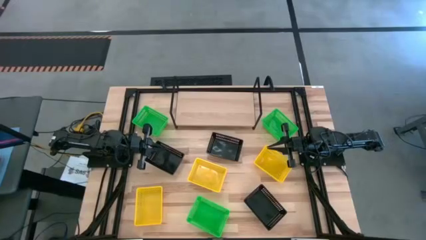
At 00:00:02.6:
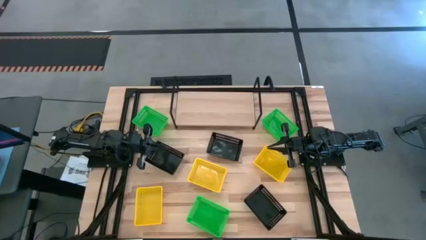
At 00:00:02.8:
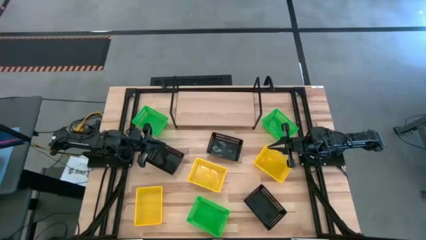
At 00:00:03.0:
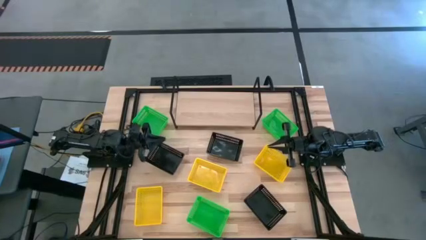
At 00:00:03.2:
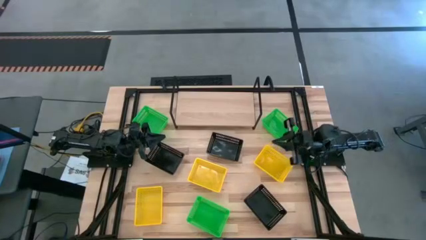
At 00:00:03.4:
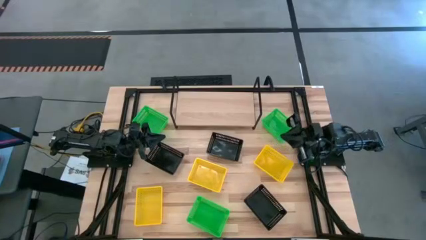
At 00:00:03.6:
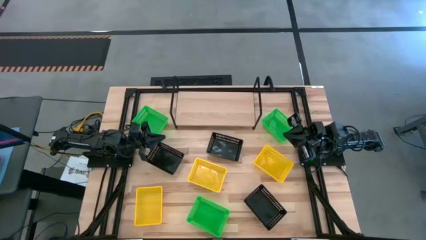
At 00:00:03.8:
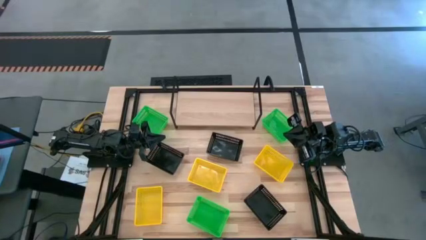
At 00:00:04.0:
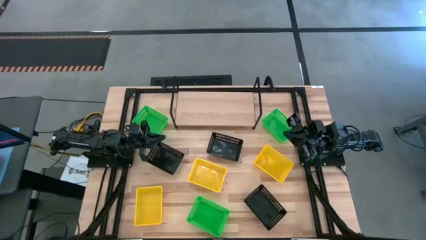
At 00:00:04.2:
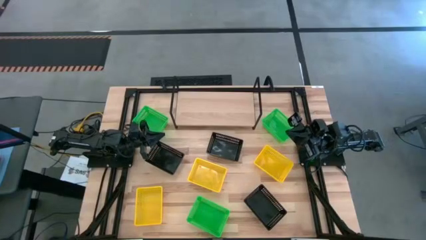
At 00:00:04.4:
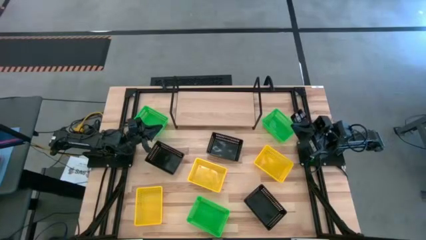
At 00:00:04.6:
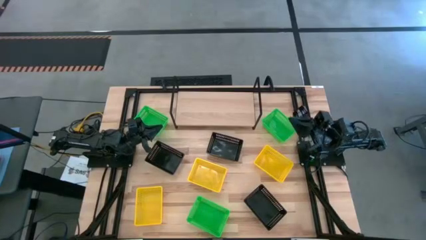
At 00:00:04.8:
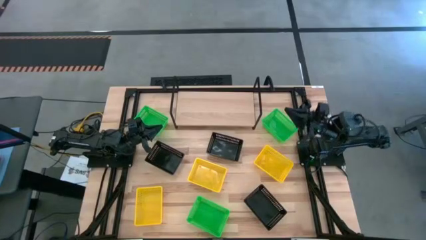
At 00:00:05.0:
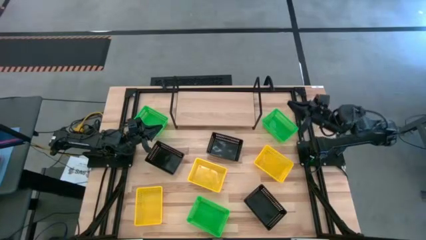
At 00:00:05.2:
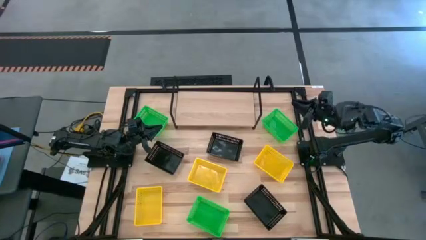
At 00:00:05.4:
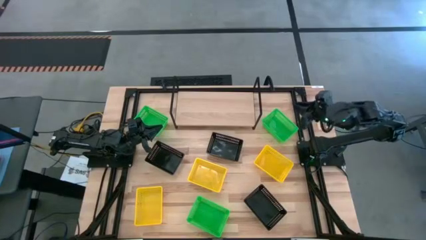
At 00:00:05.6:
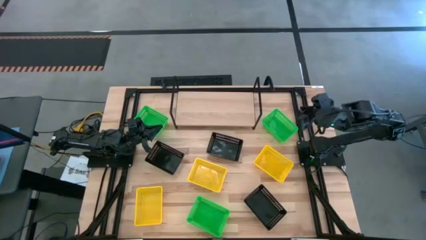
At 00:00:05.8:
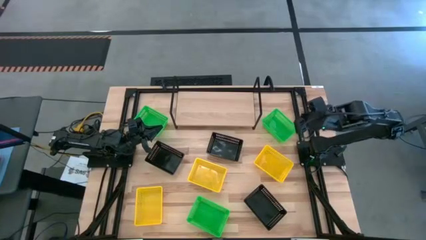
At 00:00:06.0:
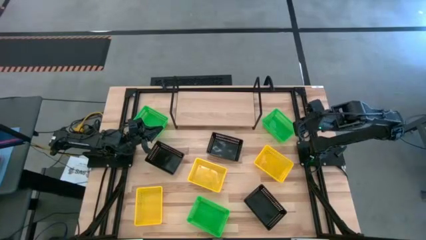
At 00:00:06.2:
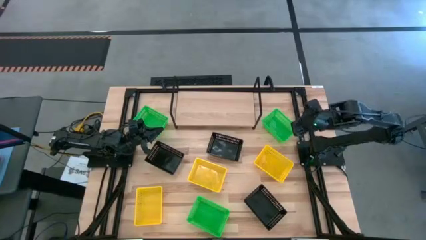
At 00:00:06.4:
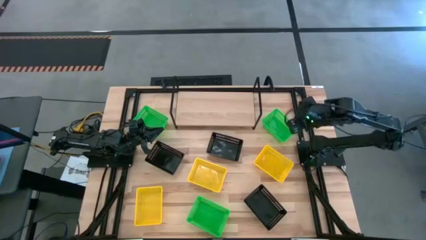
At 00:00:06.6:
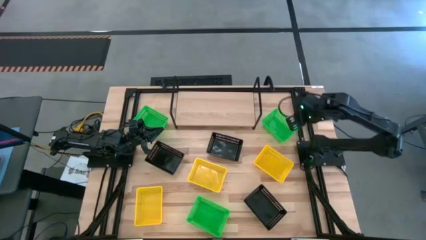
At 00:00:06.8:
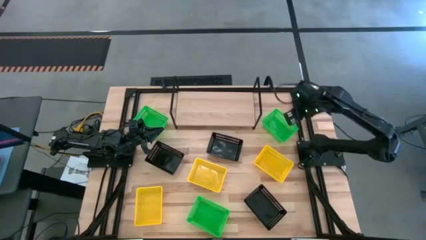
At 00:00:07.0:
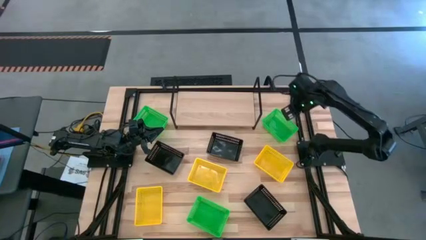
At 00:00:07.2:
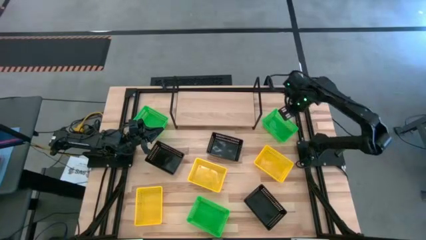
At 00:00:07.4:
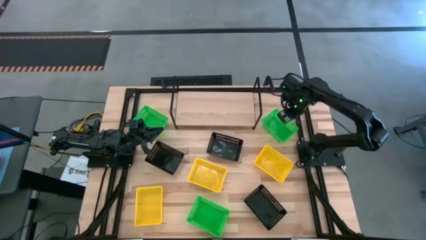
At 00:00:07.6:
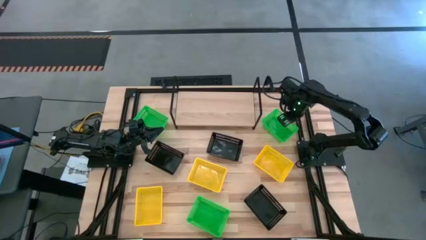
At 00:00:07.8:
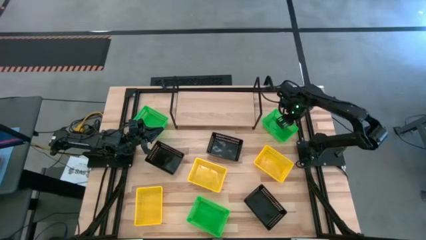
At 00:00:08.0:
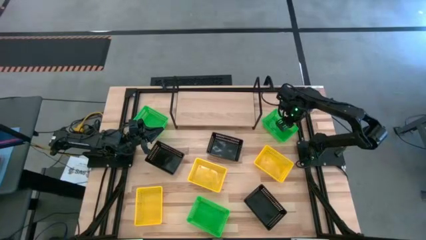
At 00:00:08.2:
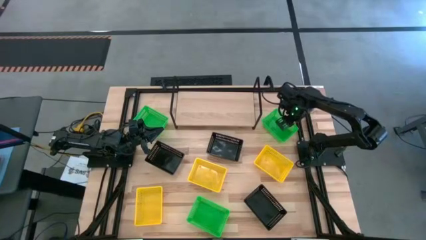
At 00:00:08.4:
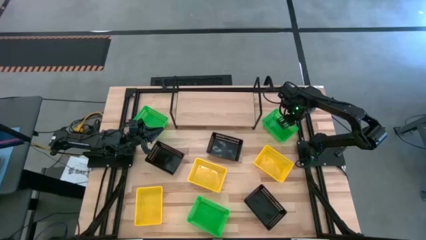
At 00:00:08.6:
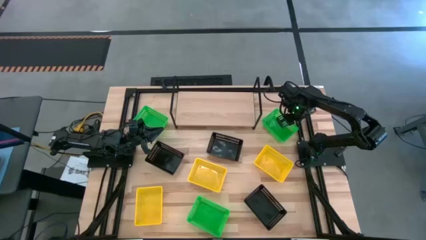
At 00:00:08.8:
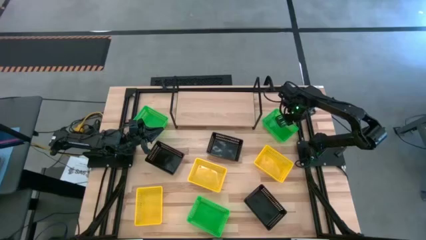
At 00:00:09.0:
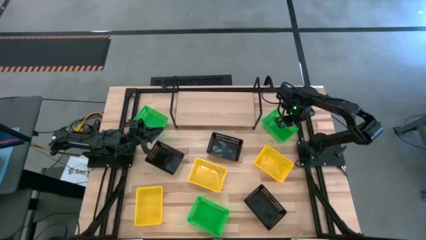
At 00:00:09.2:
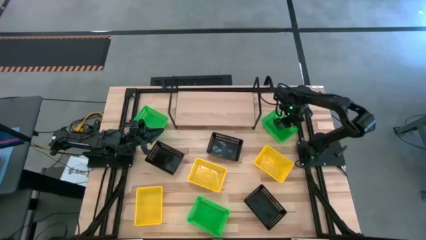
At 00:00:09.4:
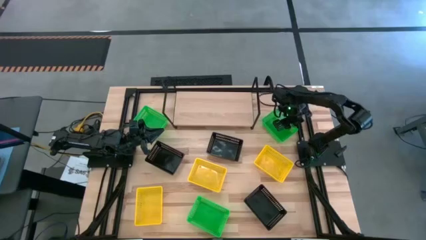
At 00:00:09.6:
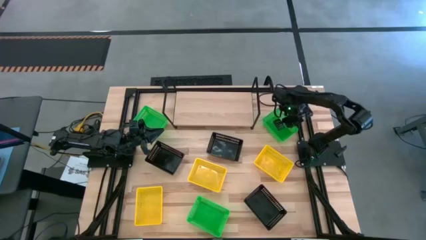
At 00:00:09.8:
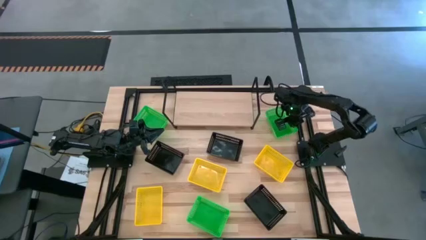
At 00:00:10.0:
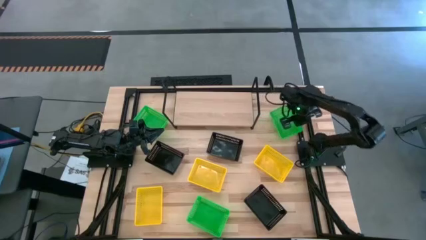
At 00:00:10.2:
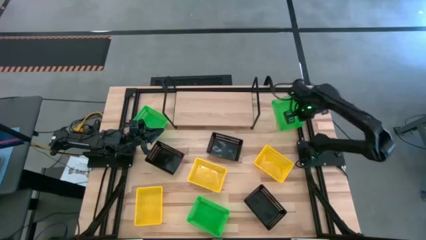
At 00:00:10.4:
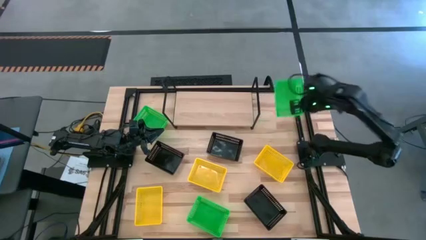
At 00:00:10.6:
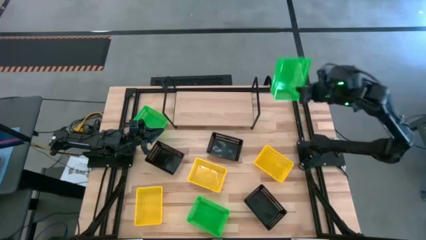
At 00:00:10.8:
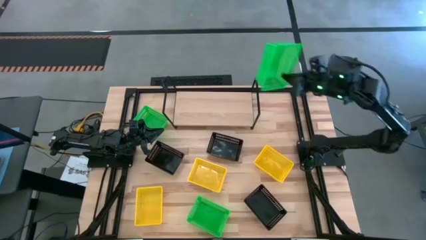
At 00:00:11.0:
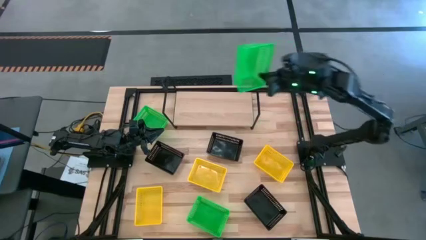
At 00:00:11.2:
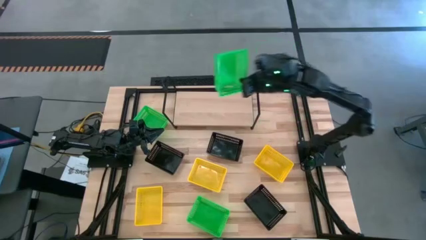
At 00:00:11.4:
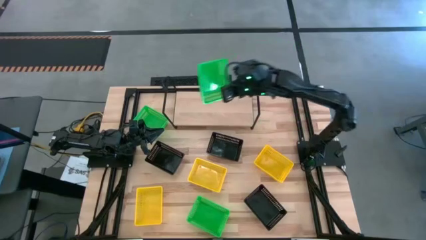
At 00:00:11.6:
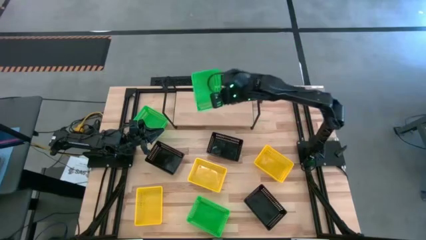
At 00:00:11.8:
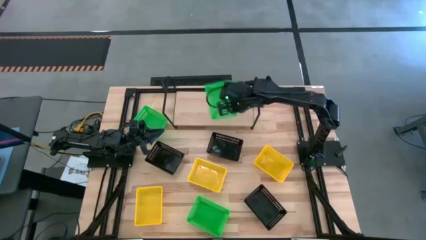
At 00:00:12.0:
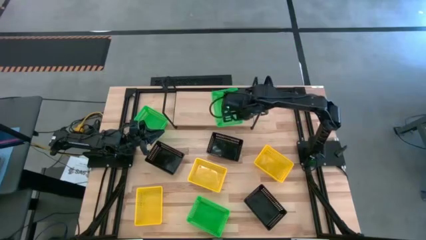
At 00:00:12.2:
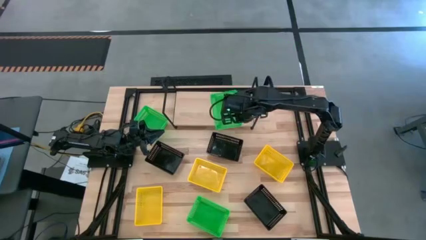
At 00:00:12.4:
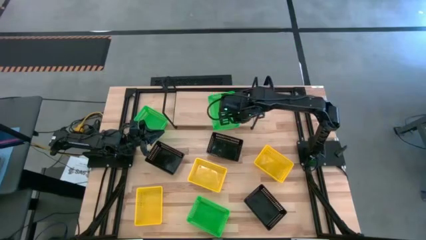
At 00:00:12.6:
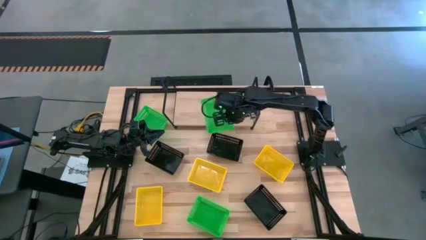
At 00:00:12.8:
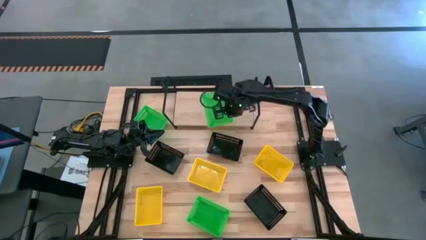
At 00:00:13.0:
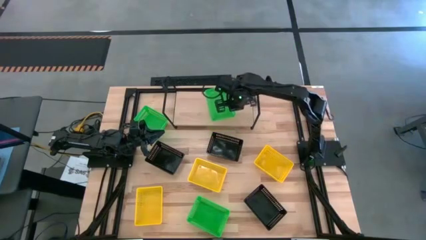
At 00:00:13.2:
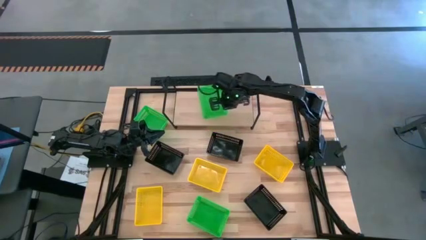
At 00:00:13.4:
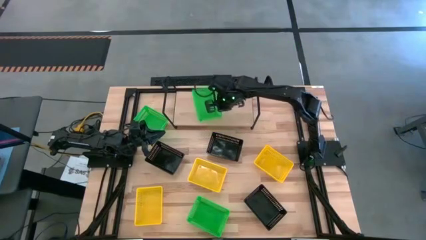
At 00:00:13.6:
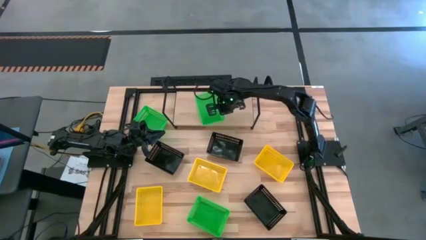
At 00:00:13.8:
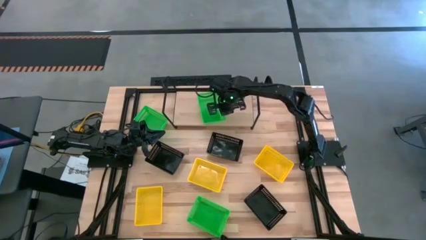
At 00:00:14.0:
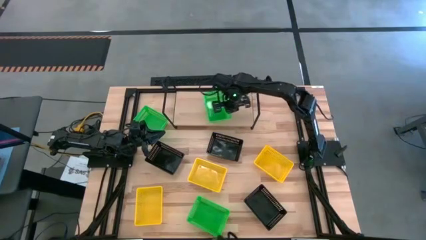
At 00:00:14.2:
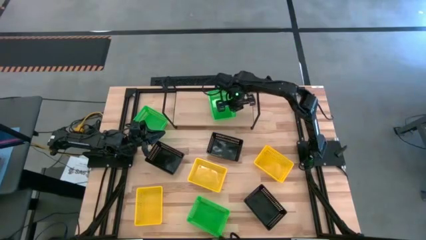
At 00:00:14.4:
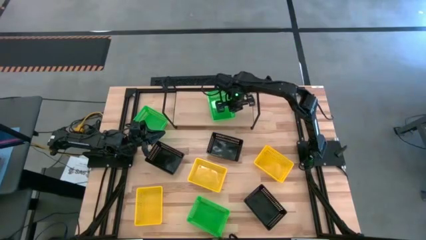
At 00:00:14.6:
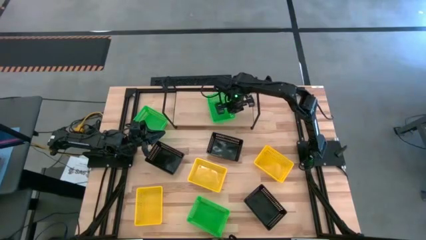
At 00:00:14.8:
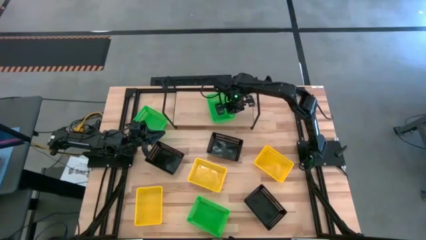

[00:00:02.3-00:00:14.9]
Task: Stack baskets on shelf by color
Put the top right green bin on the shelf
